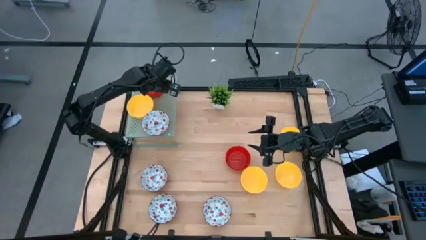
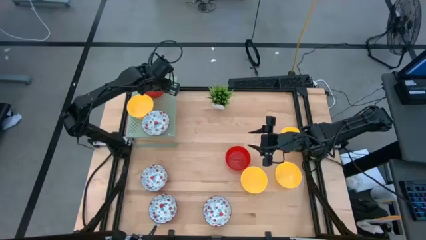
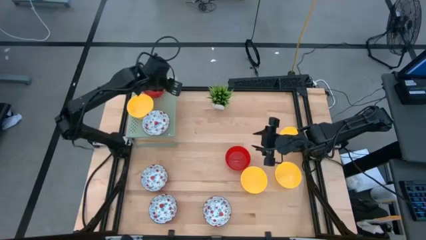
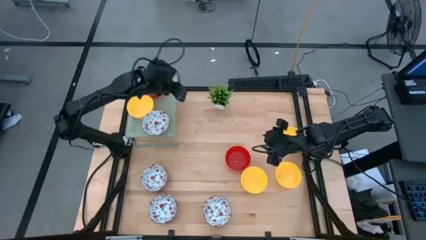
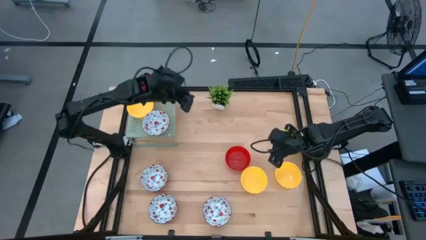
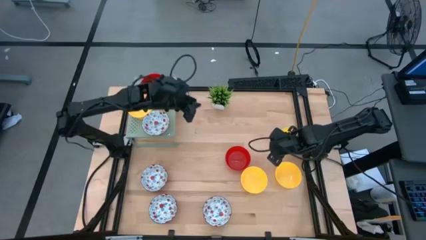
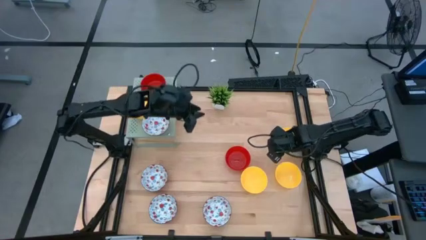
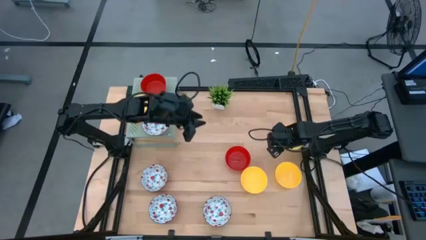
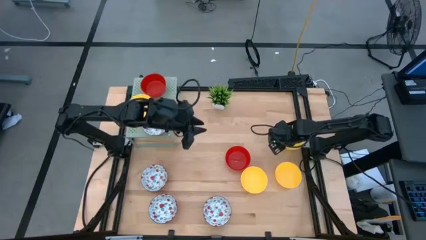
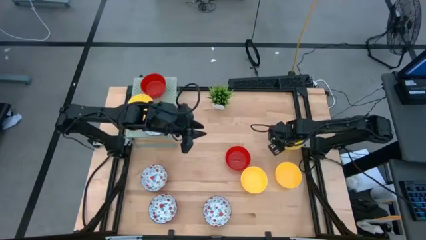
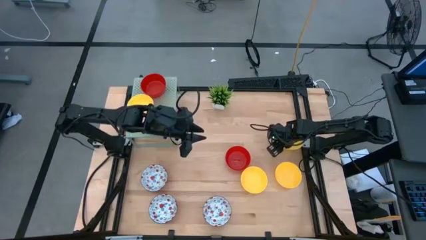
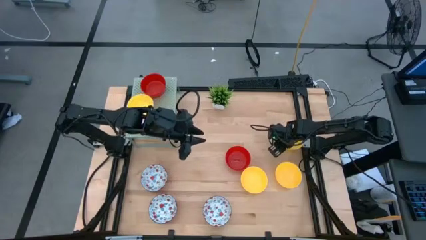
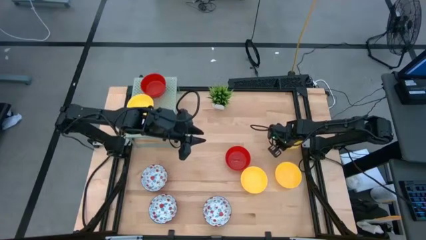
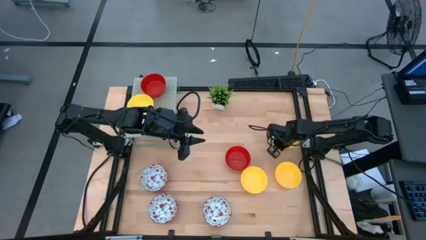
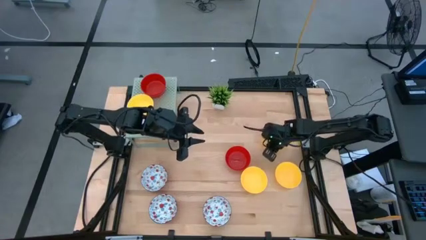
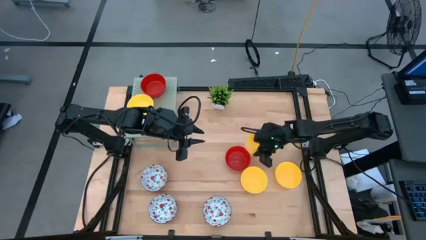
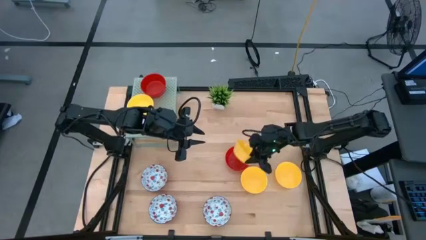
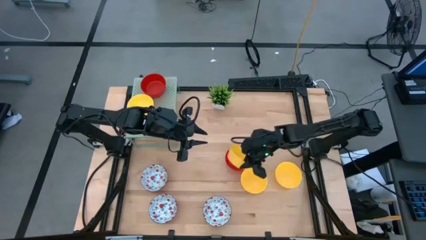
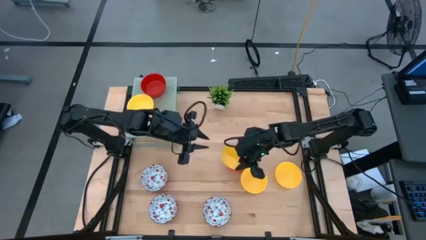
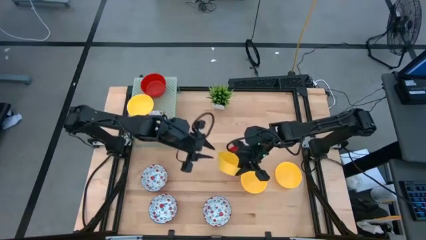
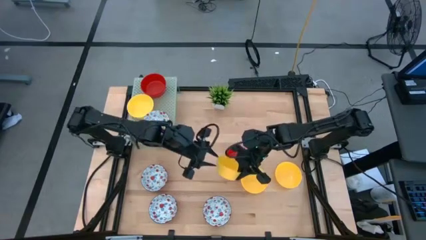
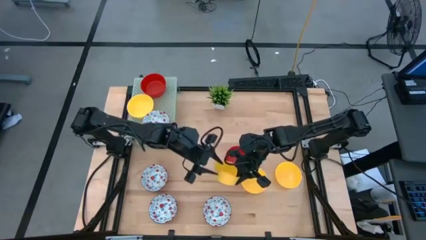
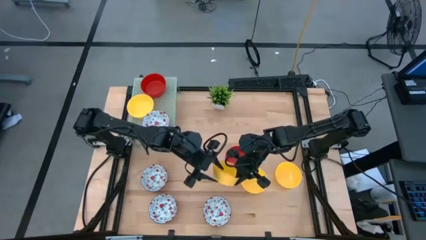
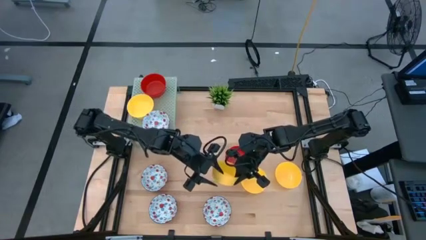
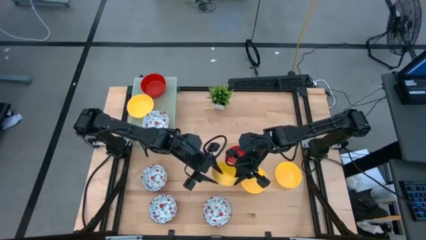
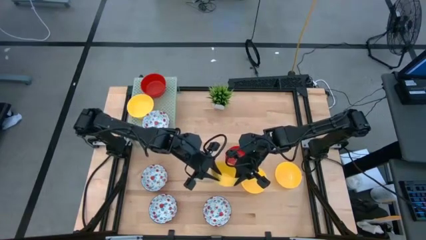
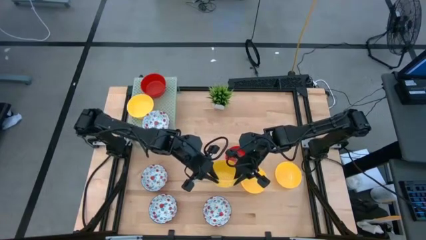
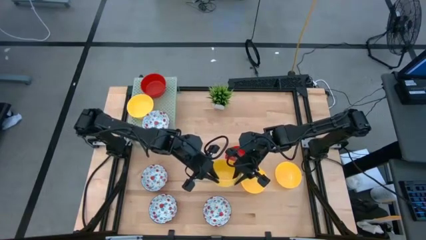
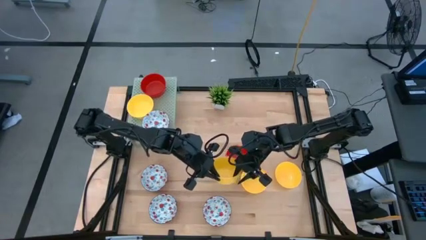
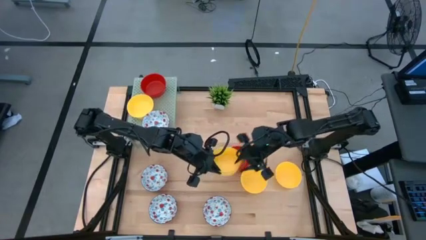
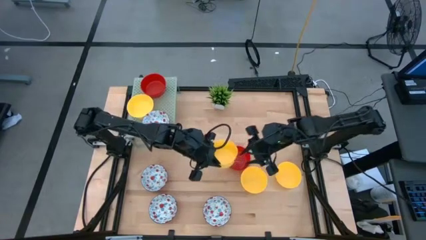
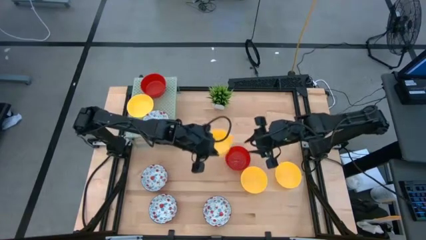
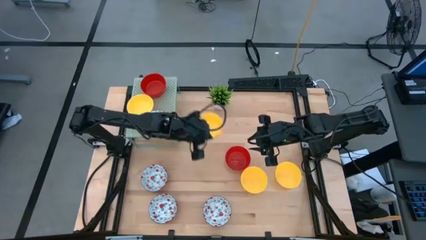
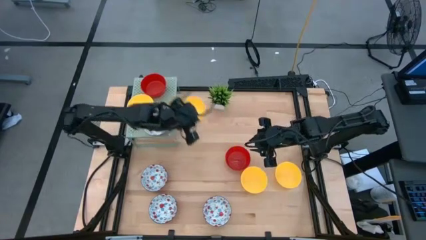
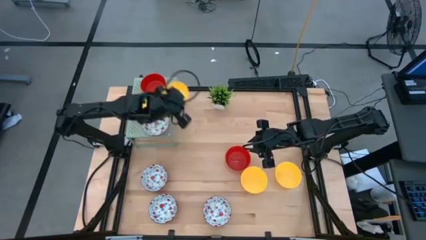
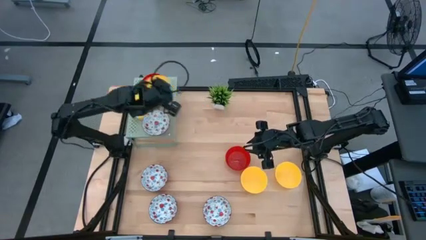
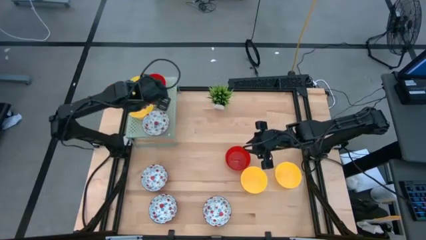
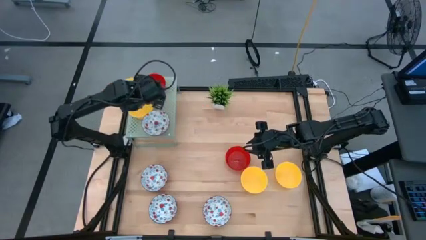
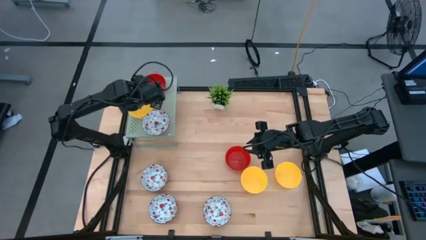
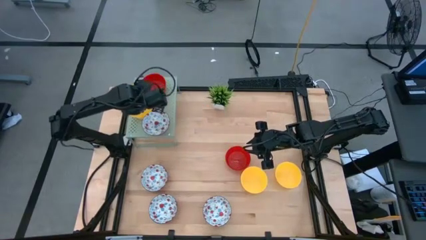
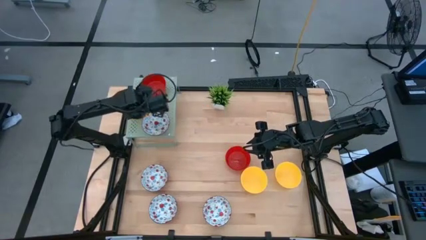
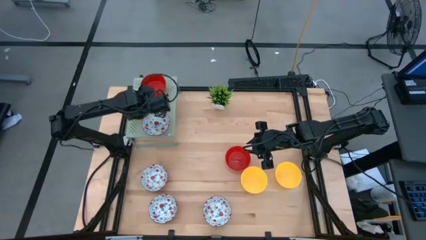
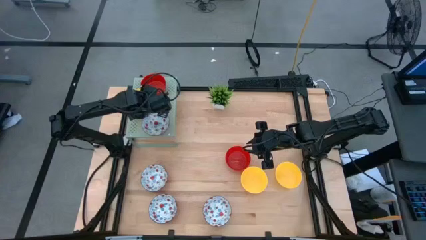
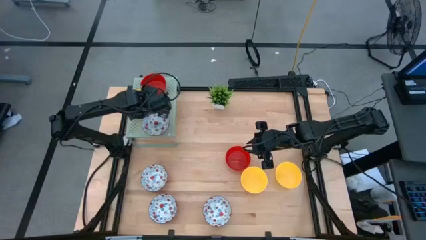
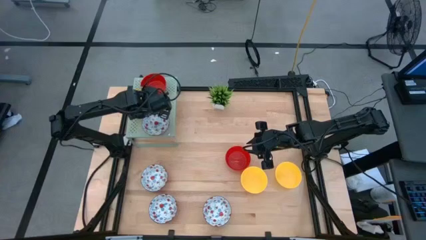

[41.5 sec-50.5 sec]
Task: Pick & Place Mini bowls
Stack the yellow bowl on the yellow bowl on the shelf

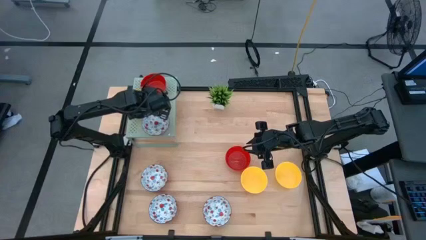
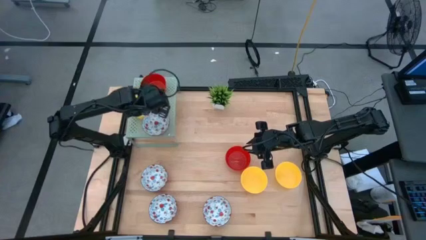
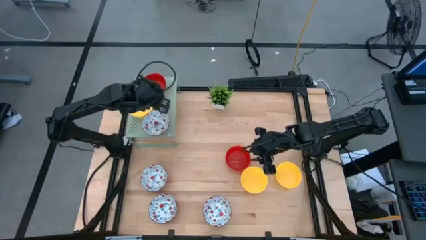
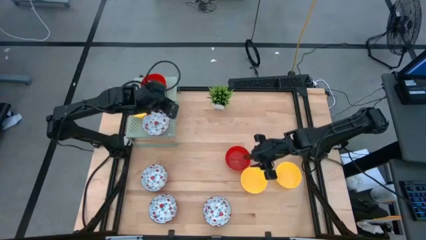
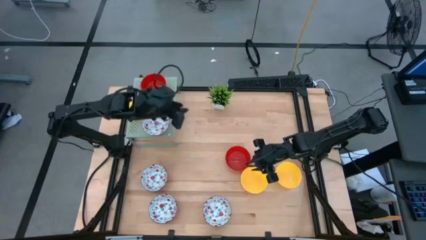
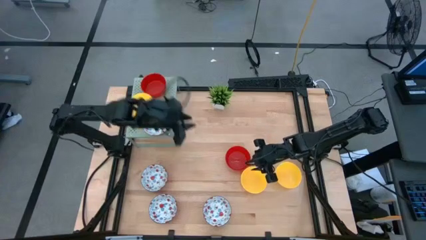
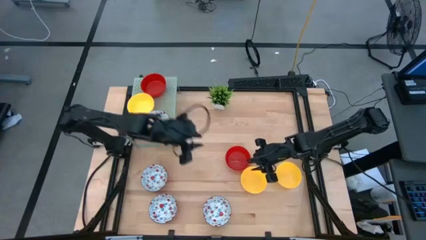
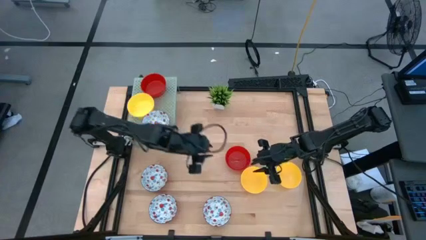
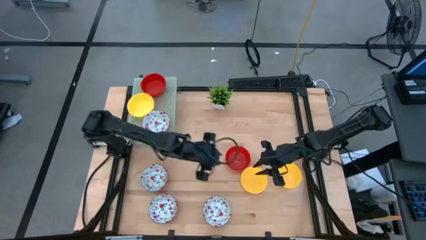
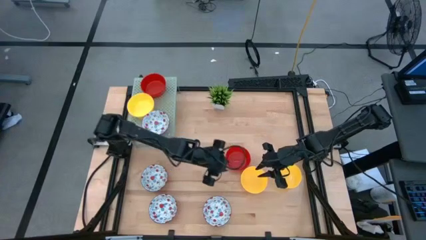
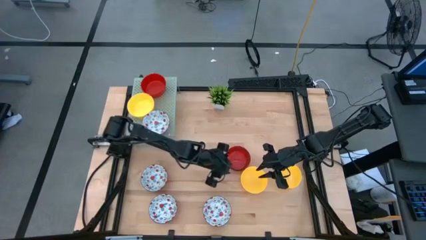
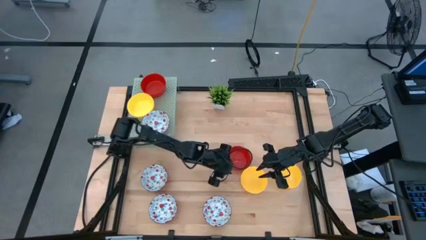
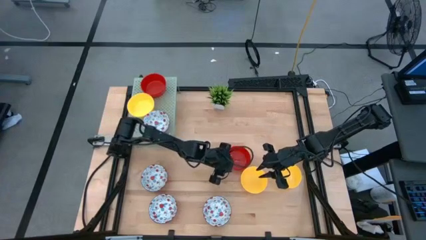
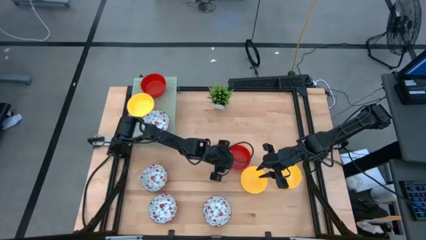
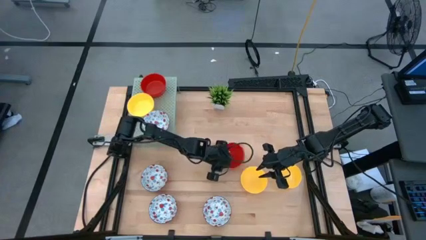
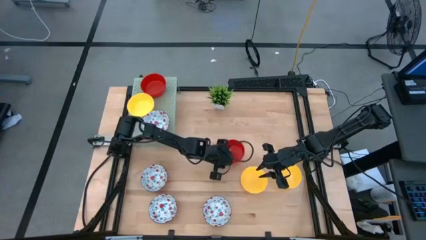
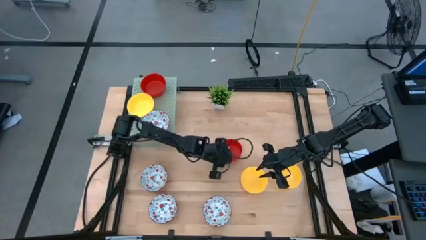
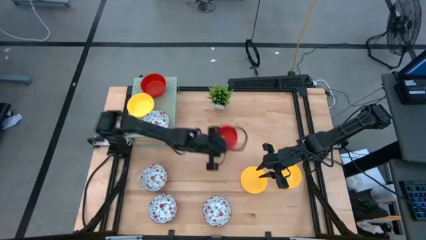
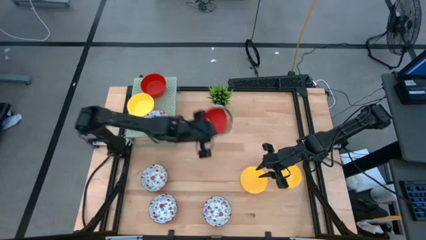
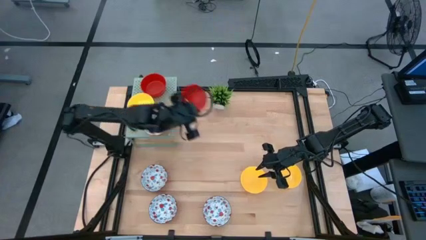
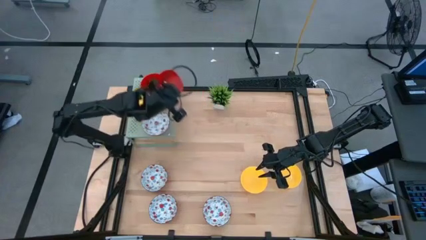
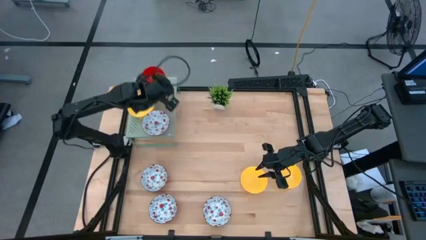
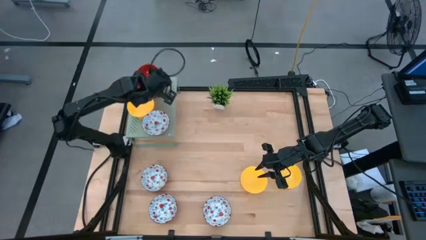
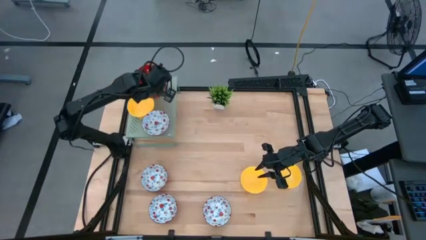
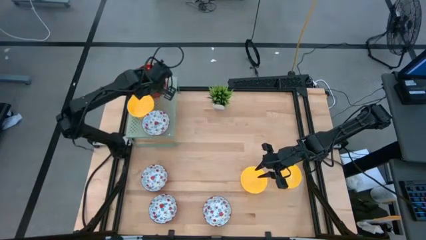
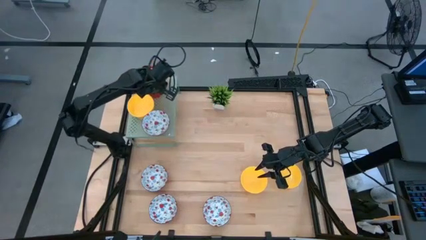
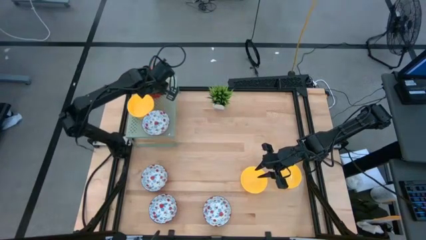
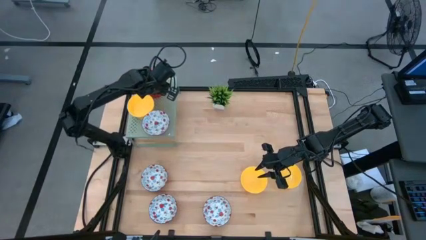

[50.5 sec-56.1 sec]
Stack the red bowl on the red bowls on the shelf

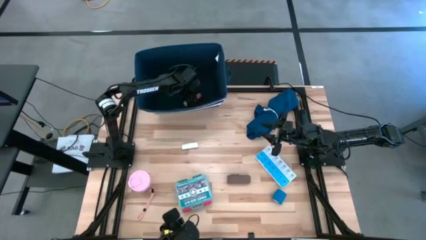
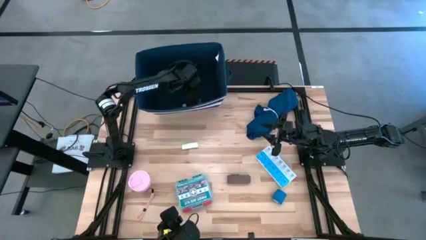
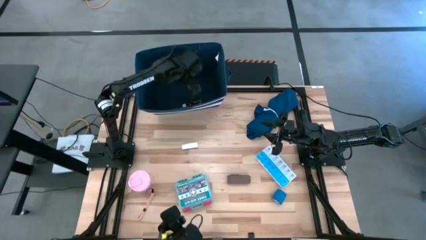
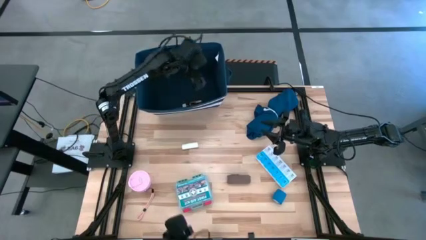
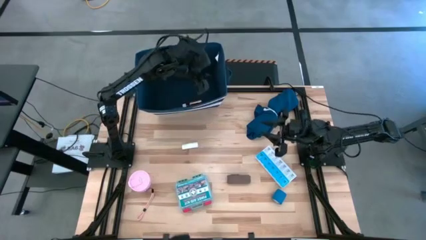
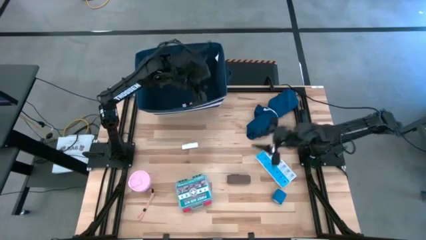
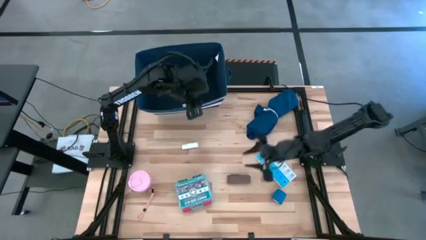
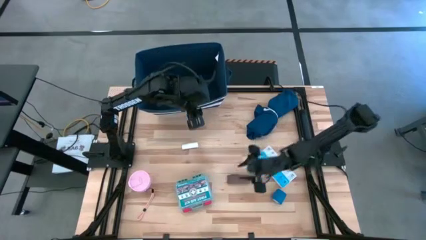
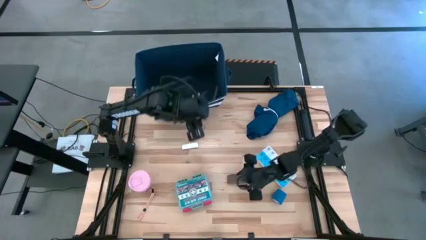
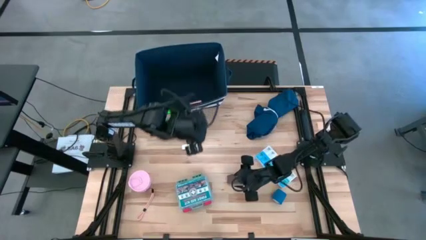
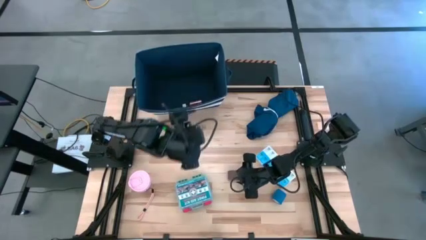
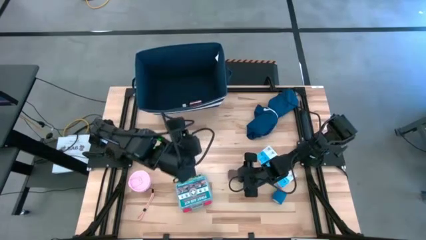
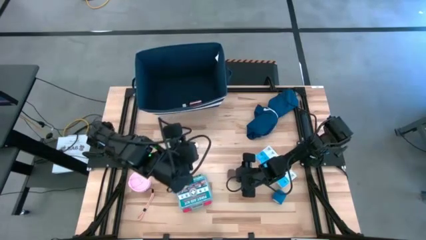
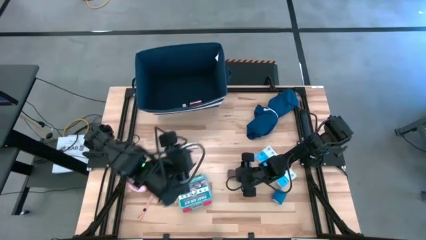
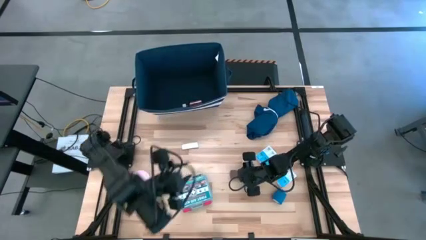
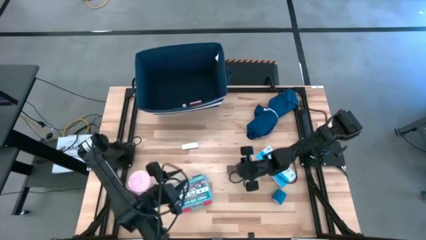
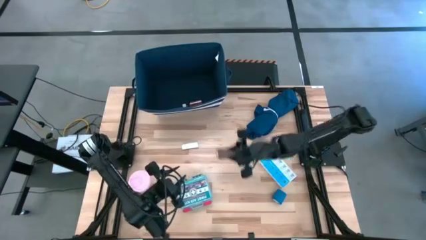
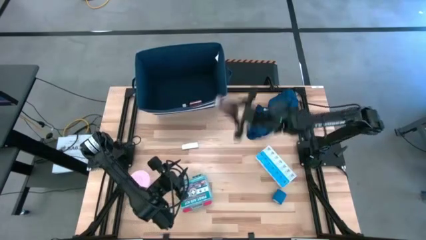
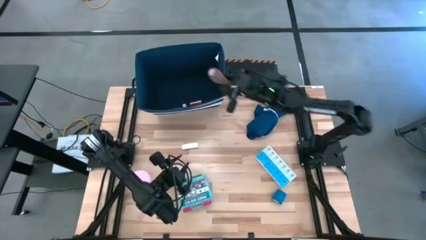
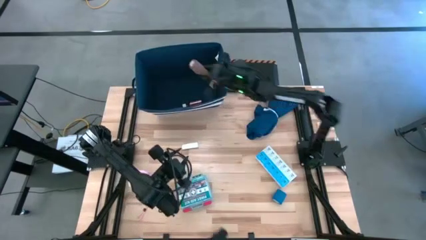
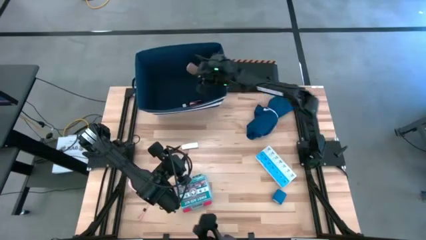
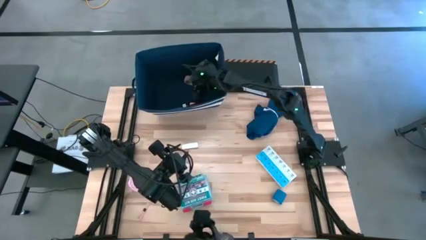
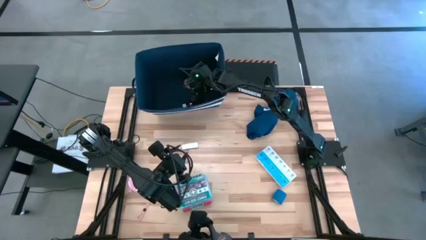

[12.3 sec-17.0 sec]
Task: Pick & place medical supplies in basket/bin
Put the rolled brown bandage into the blue bin
